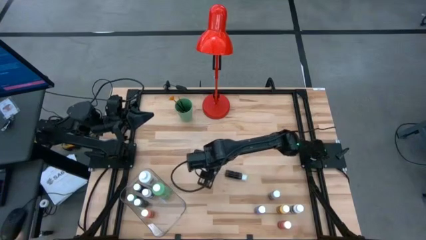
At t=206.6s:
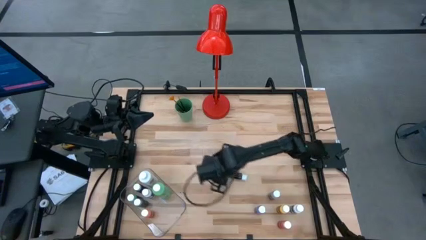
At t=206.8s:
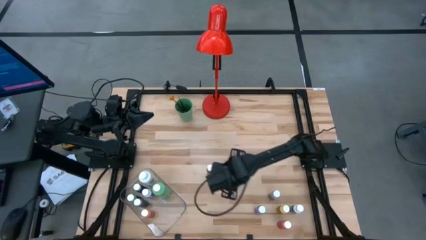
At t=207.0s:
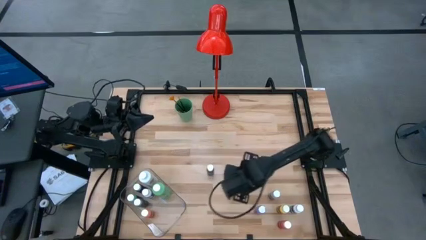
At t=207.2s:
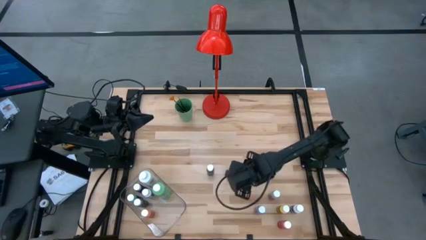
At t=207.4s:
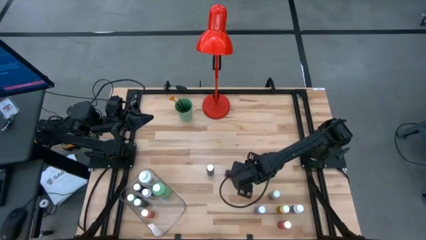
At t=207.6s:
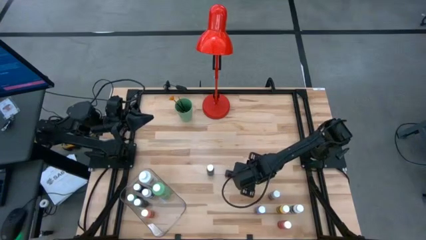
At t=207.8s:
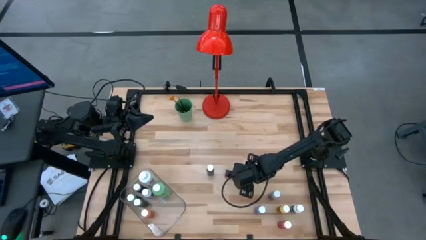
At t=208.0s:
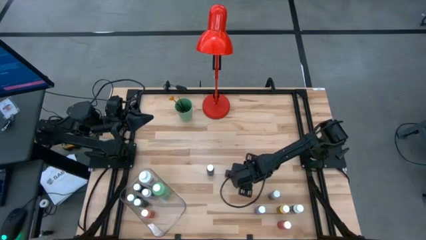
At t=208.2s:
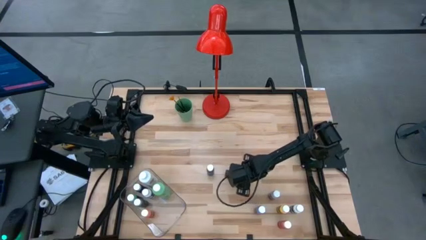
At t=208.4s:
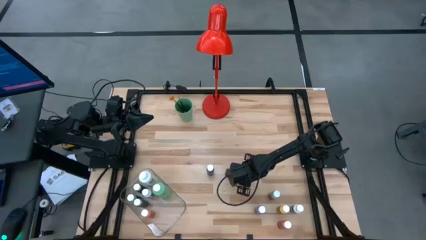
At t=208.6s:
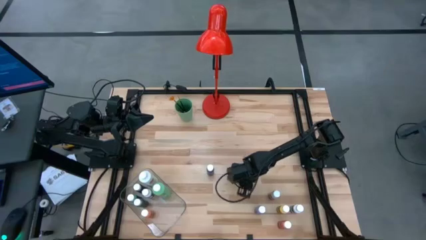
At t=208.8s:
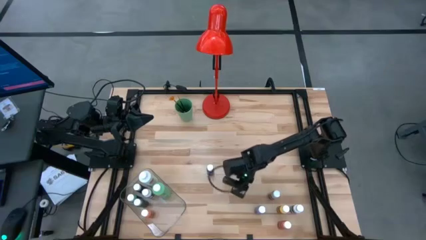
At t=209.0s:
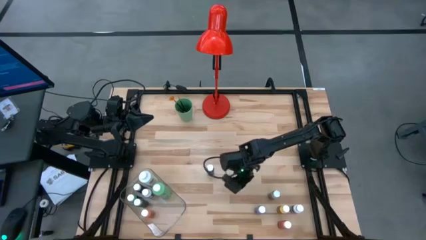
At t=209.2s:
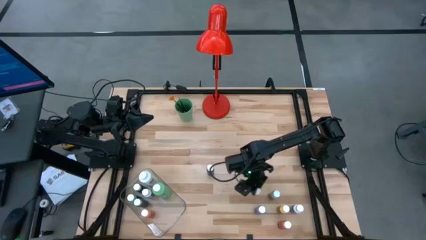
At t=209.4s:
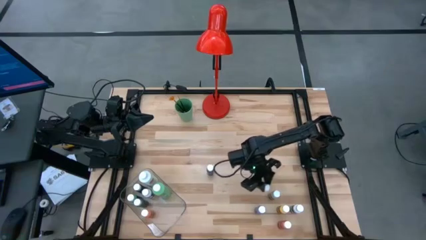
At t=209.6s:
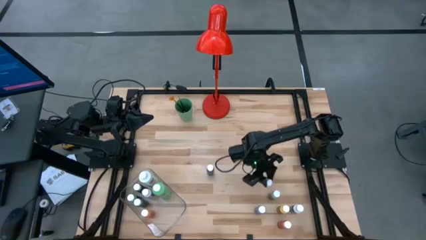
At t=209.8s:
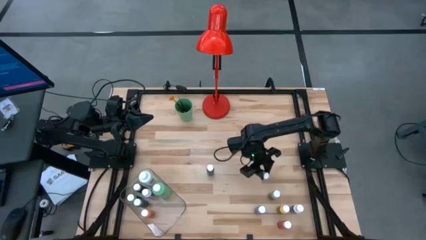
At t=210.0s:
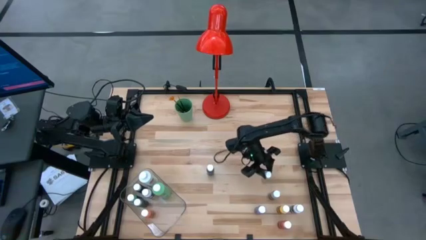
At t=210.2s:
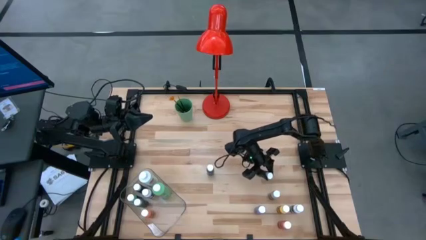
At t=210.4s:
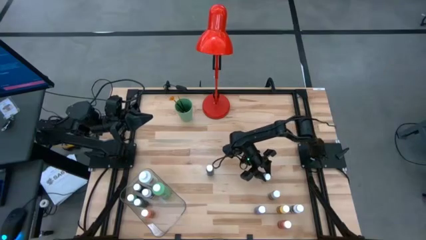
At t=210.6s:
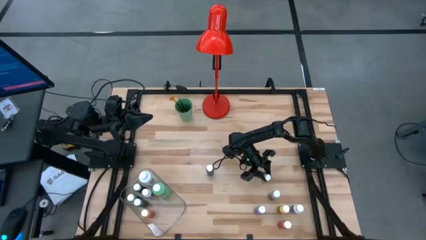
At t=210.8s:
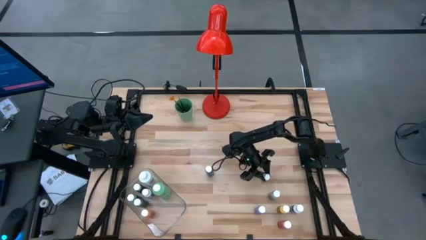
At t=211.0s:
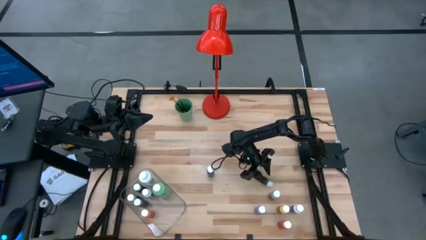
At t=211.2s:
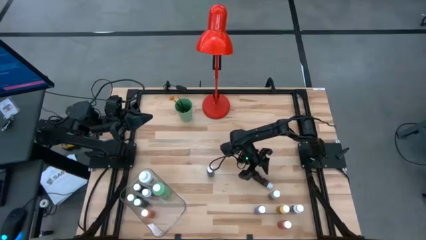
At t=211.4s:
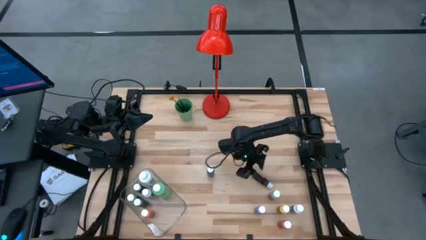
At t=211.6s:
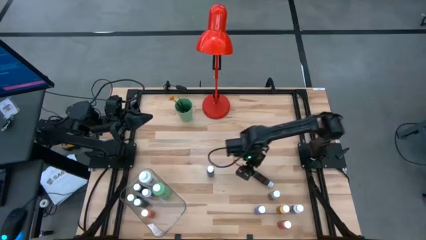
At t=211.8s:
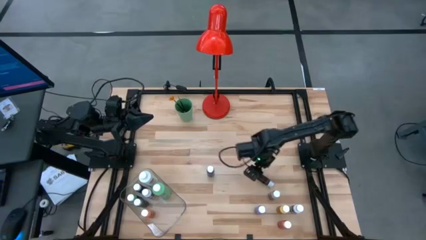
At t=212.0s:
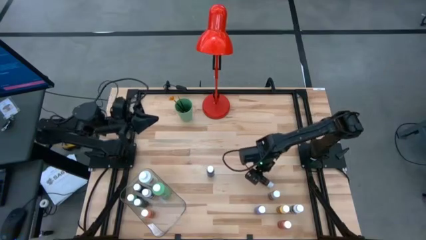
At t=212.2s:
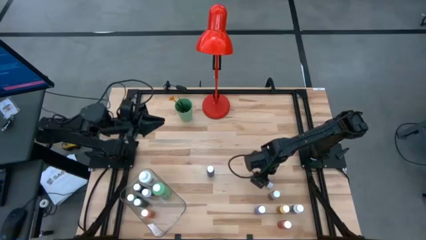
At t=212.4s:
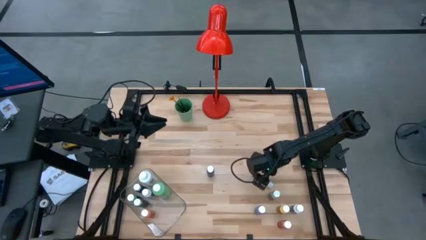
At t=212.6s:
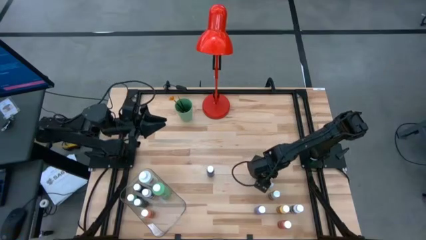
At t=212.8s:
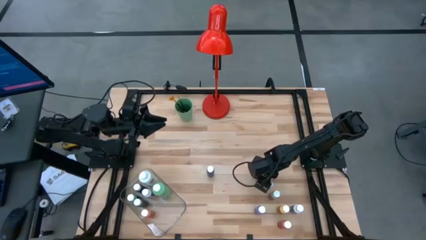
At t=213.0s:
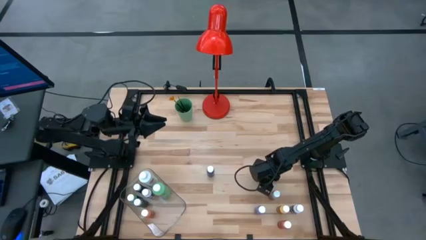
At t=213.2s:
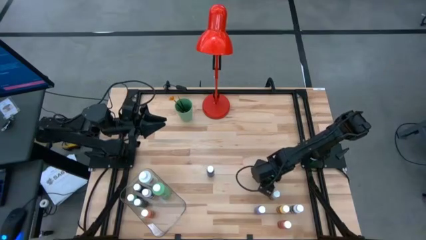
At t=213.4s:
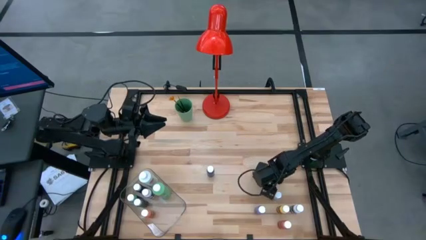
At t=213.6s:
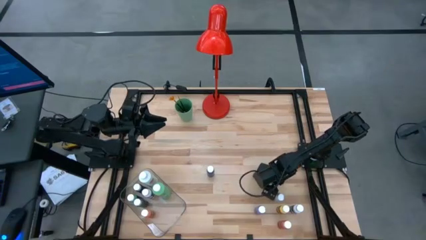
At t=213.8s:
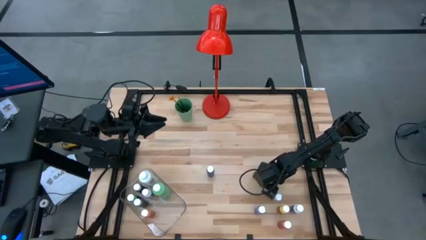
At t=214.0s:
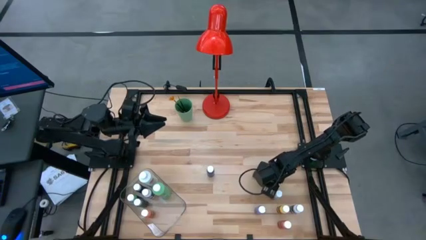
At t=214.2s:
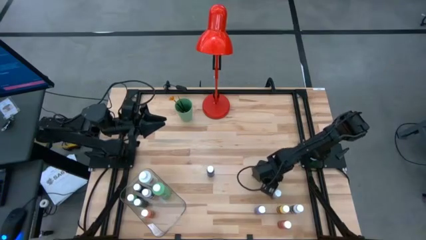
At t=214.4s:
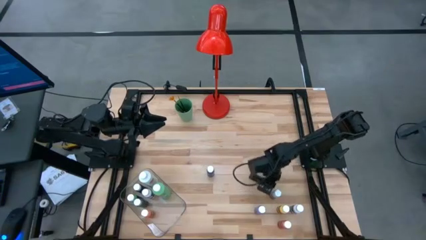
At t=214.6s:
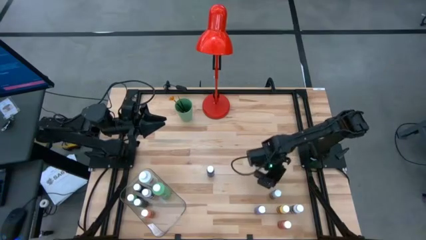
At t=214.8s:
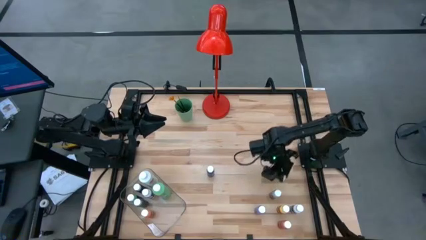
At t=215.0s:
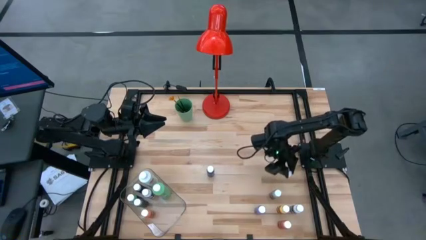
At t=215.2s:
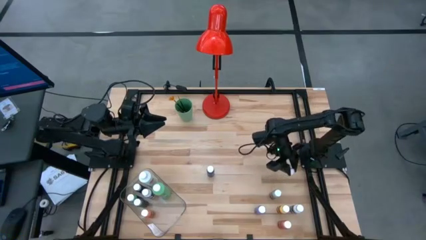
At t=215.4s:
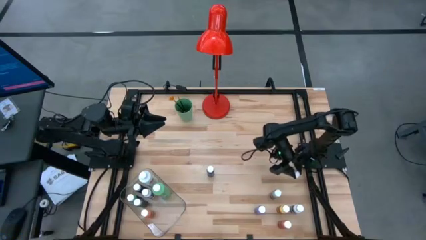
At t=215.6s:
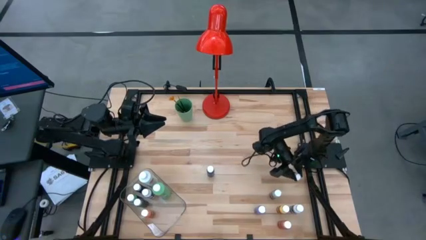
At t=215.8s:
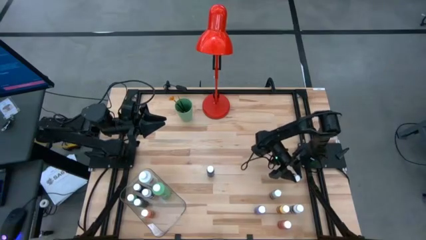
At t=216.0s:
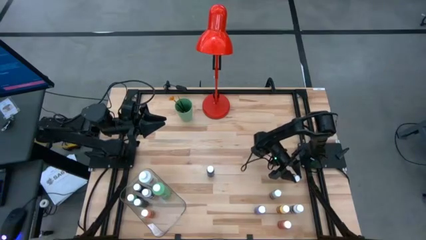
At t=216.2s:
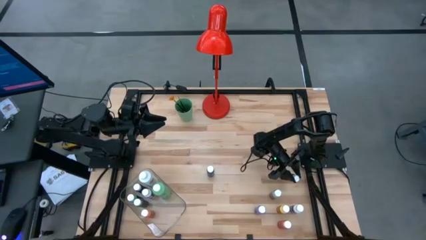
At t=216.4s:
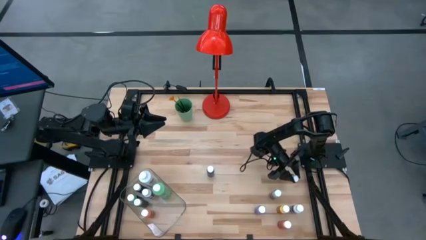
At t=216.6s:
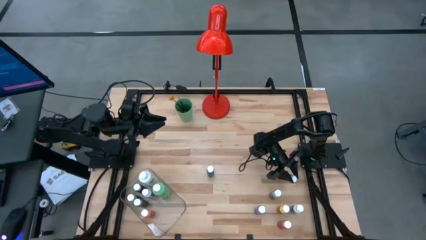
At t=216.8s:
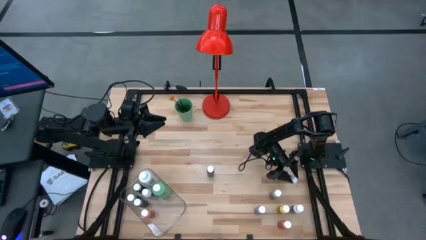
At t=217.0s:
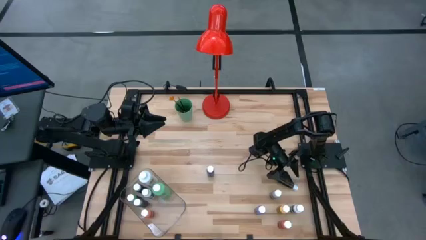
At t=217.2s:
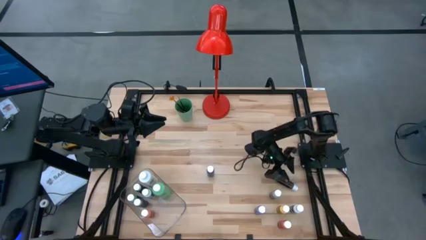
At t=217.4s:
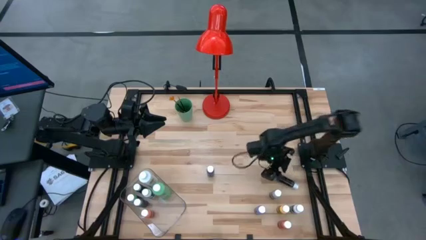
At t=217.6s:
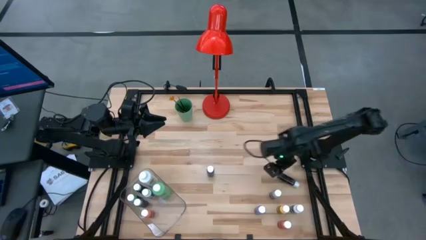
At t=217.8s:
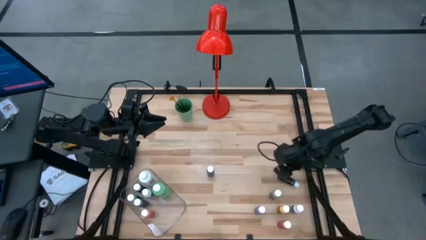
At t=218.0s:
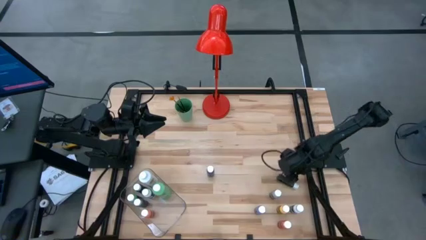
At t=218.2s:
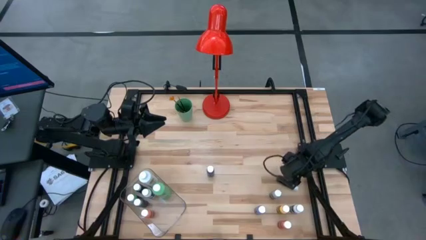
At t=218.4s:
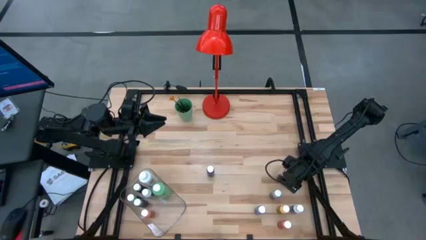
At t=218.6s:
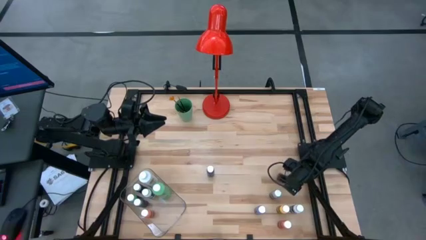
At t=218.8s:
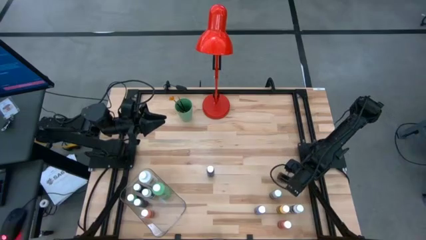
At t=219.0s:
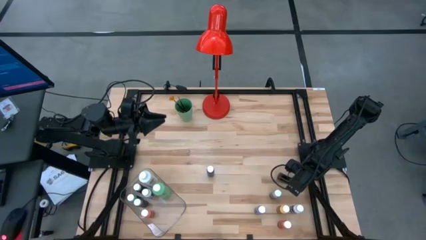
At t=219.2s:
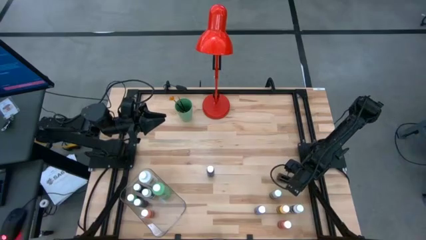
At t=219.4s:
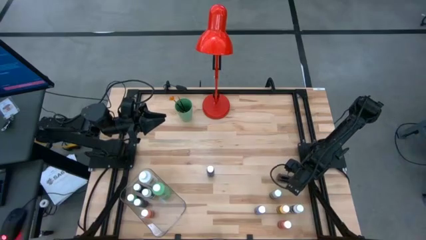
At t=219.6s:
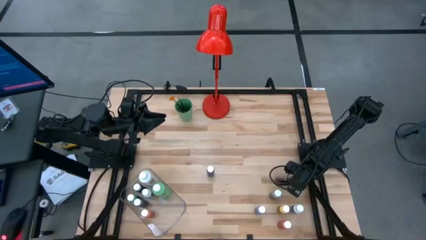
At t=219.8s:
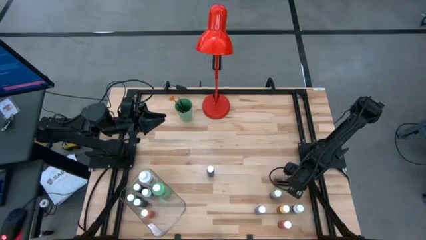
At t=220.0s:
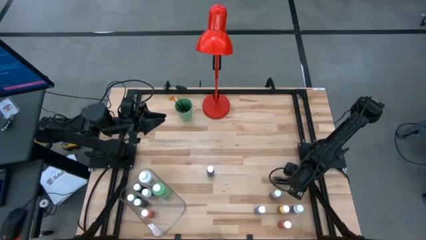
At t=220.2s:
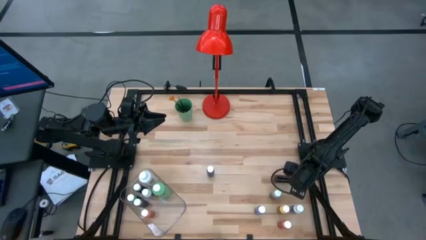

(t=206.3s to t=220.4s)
Task: Pick & Place Paint Supplies
Adjust the brown coloring bottle to the center of the table
